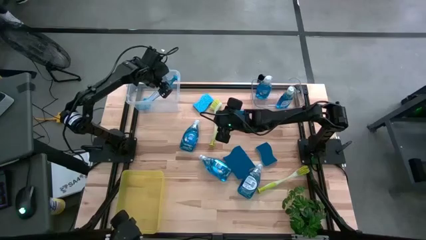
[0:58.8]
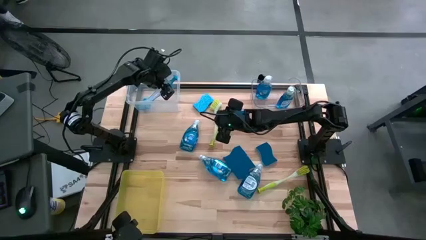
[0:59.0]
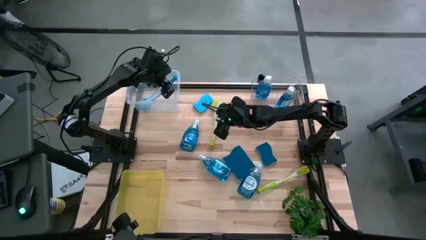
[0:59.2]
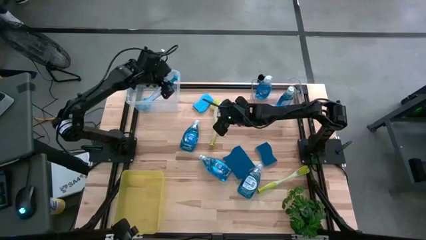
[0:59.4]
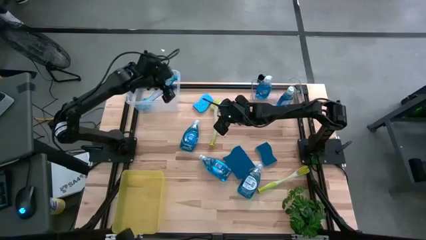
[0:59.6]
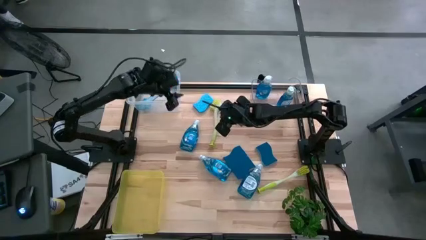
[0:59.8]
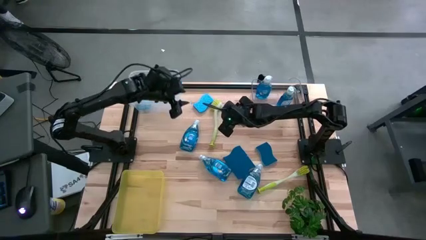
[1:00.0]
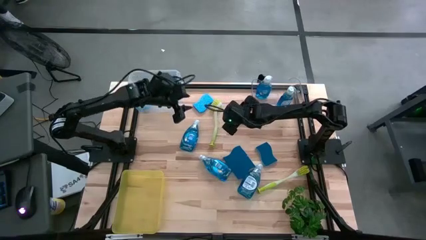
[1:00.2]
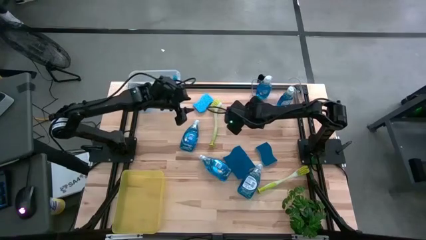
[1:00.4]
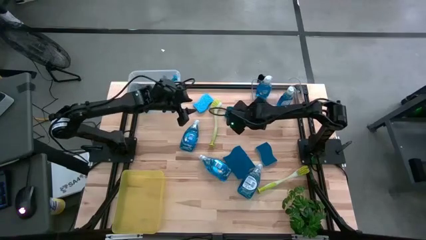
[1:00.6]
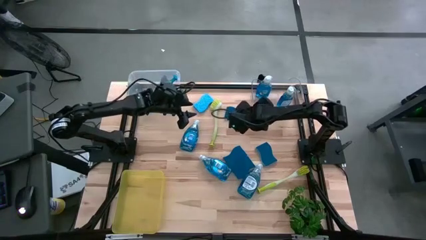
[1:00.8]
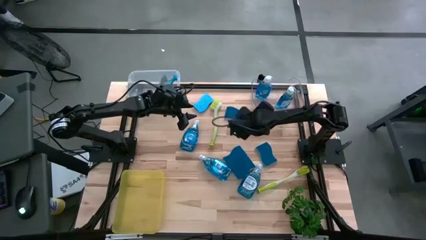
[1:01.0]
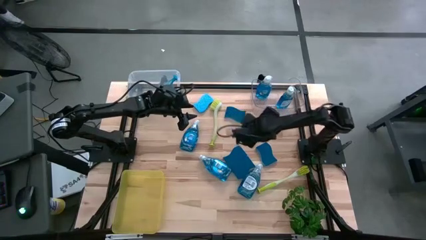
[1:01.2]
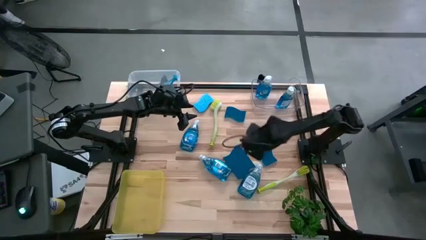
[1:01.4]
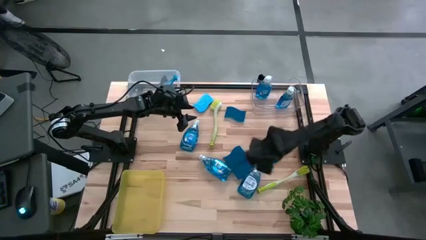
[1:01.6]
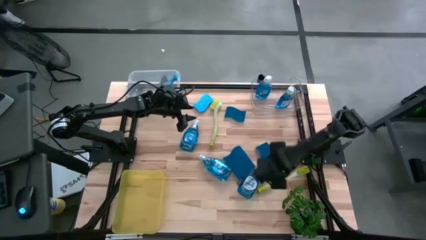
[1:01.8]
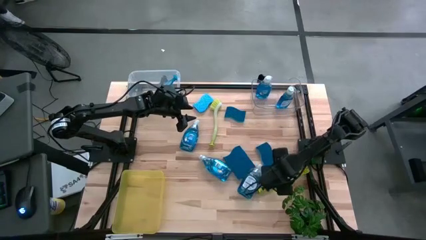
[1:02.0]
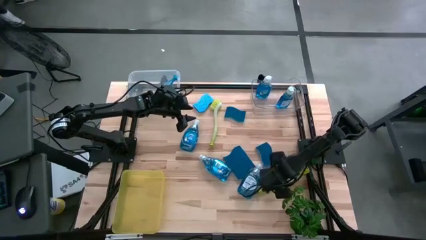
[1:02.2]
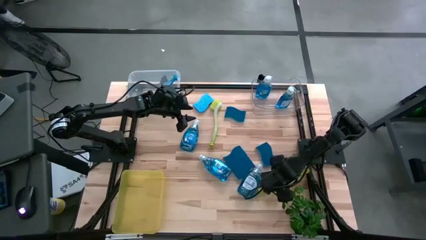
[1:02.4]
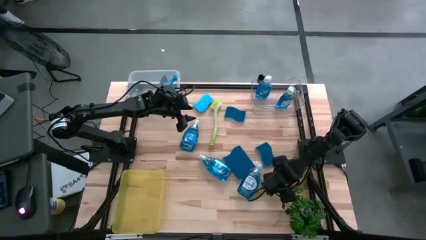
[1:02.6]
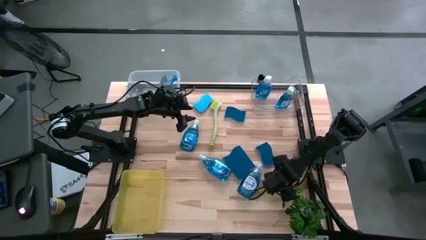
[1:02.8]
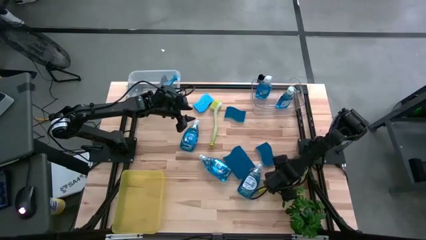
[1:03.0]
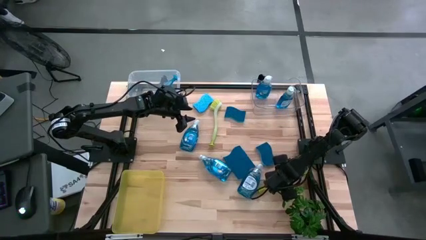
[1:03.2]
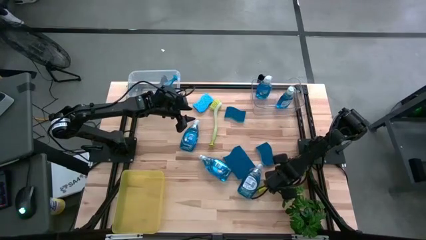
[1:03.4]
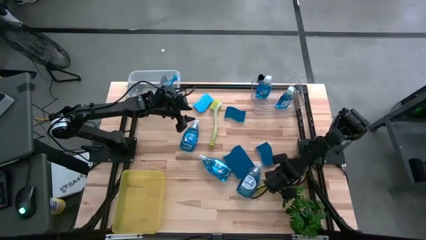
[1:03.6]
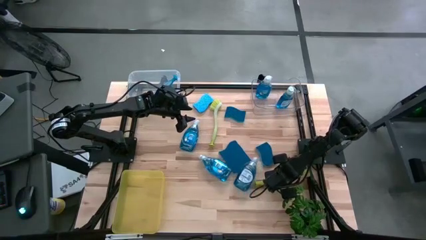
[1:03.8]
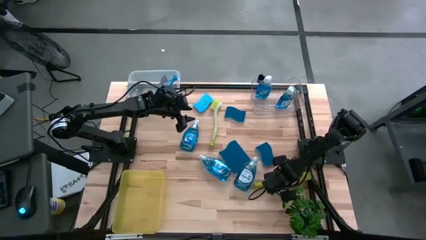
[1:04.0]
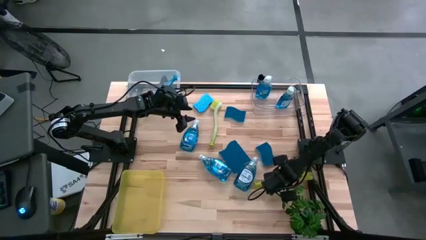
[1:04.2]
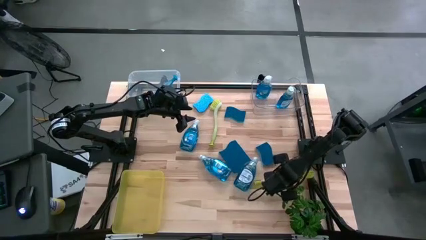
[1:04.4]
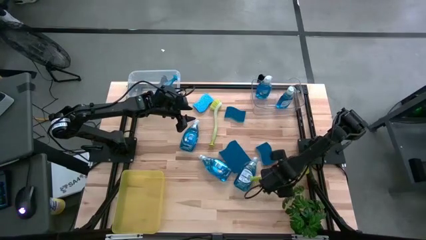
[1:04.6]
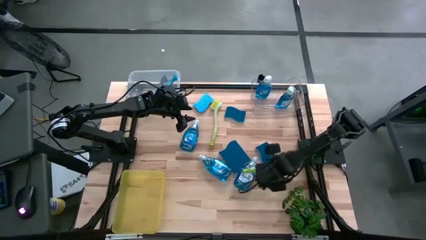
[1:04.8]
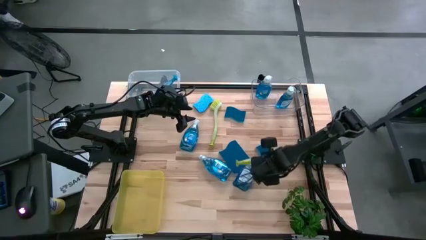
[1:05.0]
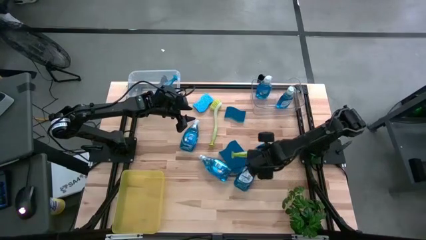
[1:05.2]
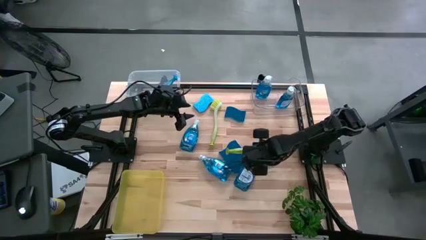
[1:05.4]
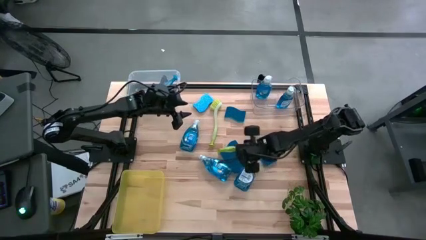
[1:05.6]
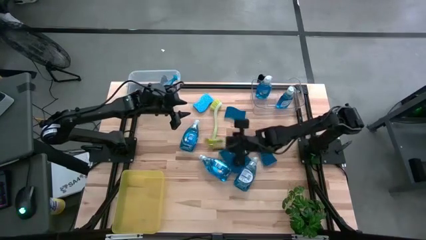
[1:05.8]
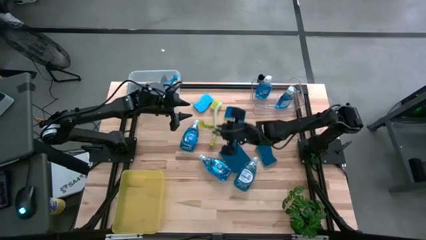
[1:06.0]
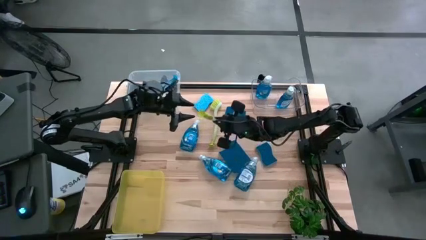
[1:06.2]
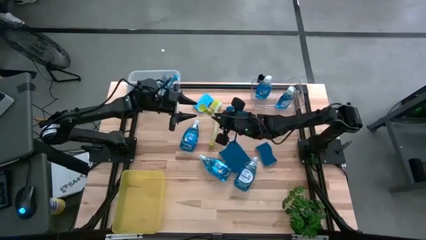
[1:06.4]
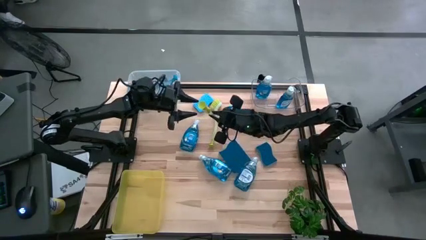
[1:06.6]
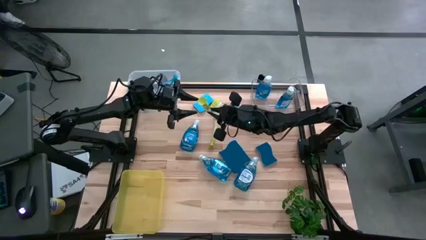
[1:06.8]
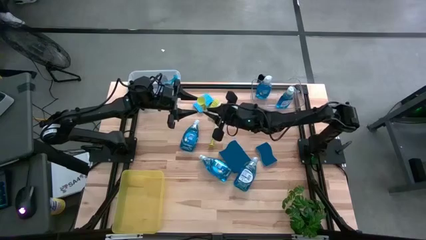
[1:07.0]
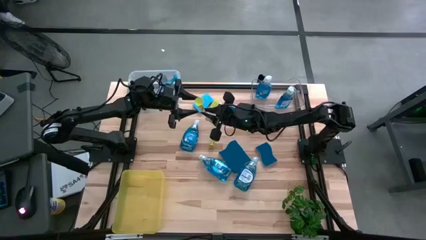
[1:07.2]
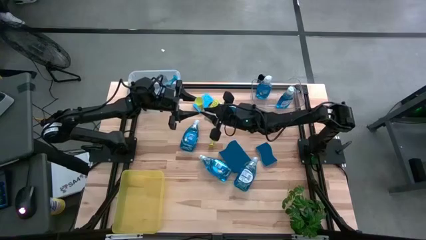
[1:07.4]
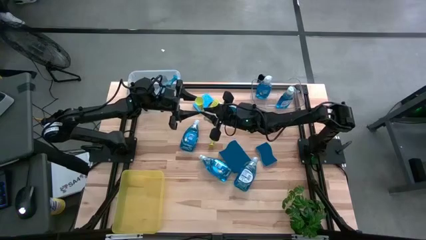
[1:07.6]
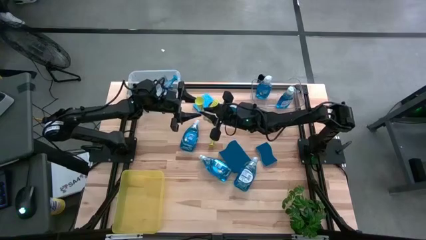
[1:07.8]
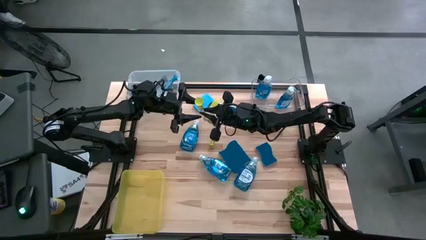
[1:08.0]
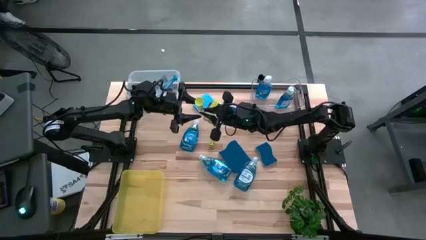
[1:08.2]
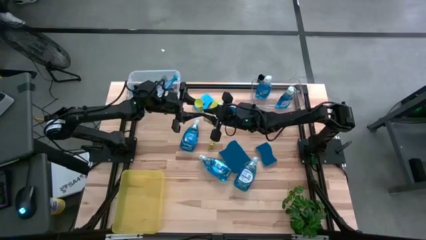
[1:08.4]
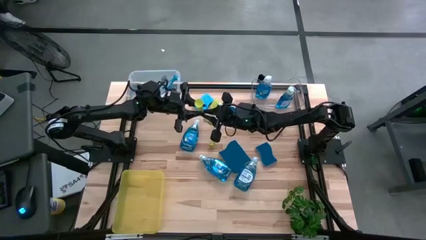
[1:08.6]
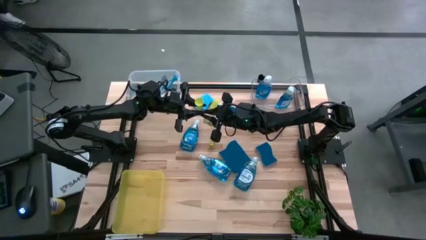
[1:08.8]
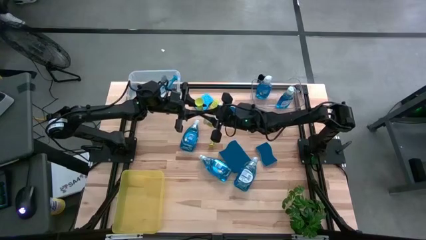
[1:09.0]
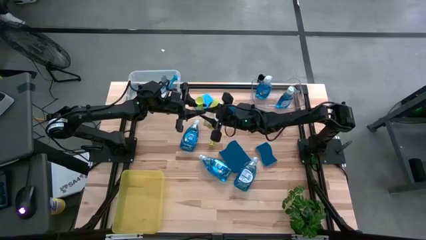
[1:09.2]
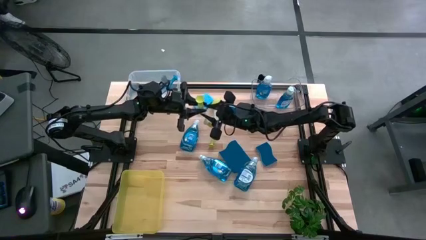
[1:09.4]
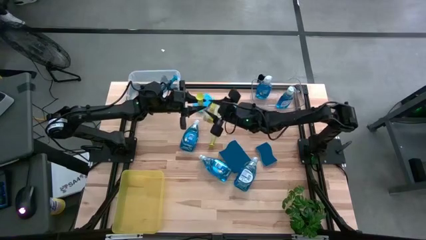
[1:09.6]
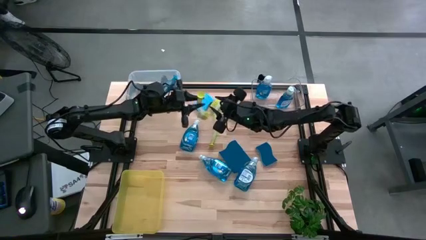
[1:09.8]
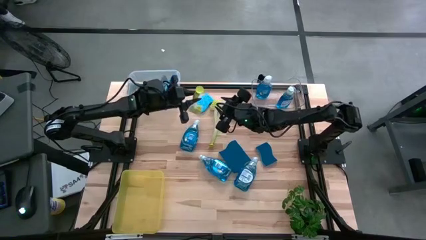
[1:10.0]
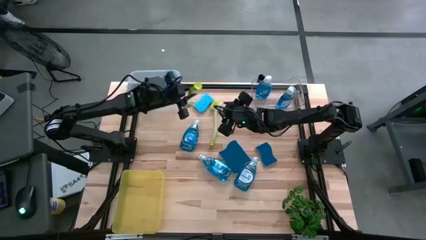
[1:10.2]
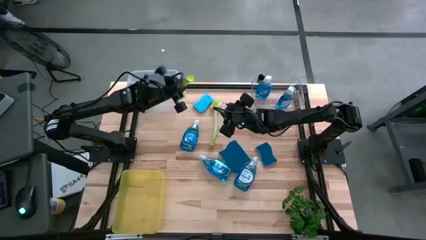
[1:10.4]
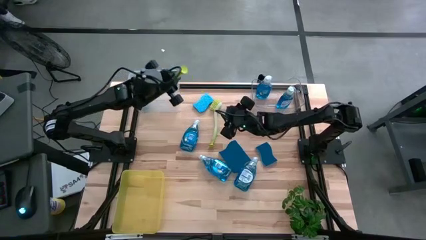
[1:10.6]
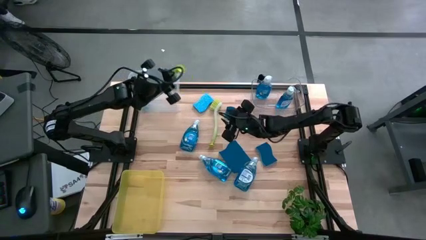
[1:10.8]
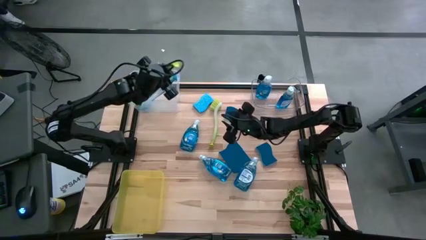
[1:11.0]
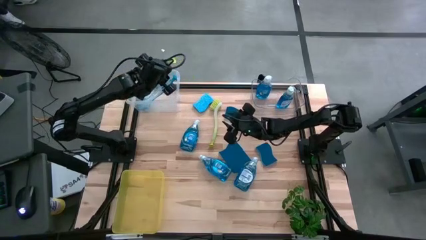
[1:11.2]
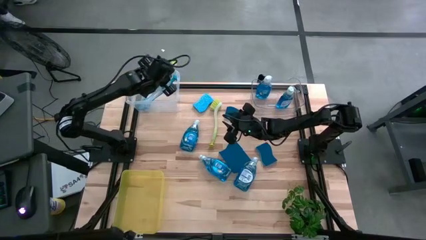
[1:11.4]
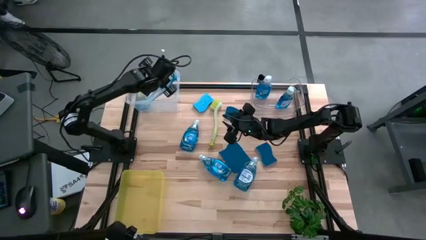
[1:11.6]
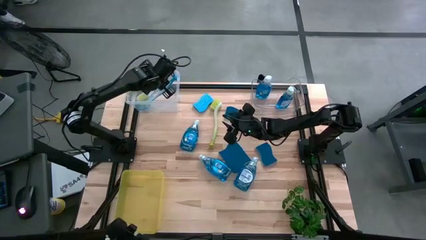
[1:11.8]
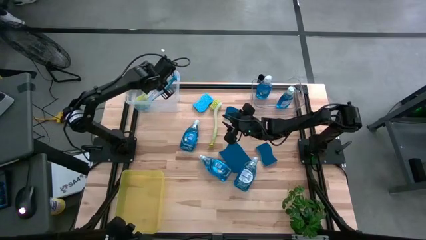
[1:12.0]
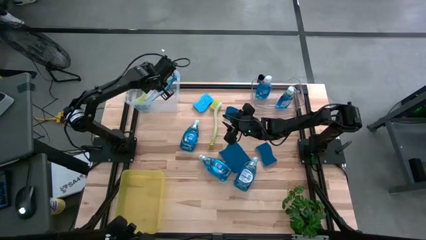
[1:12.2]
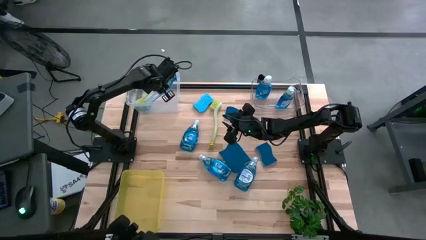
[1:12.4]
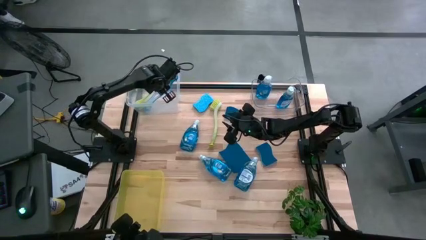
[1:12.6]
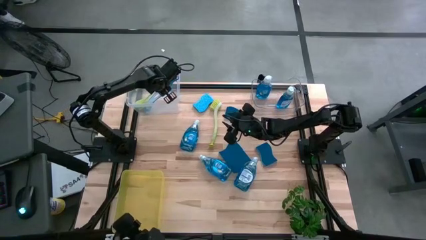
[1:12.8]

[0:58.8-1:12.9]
Task: Pick & Place Kitchen Sink Supplies
Put the bottom yellow and green dish brush into the white transparent bin

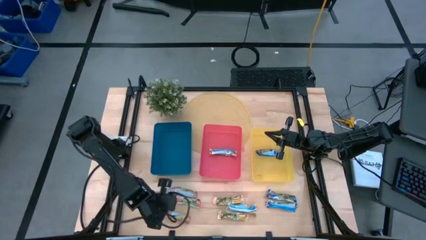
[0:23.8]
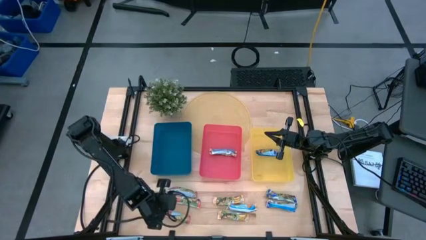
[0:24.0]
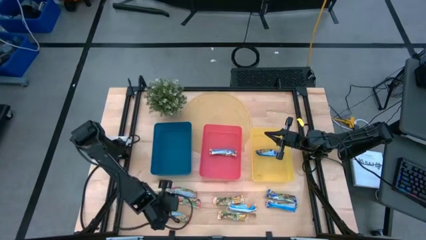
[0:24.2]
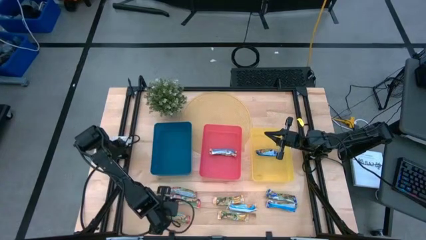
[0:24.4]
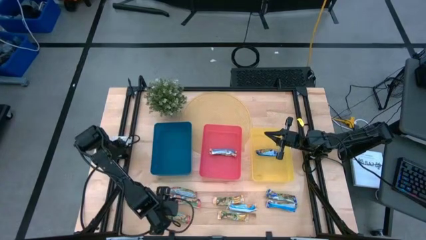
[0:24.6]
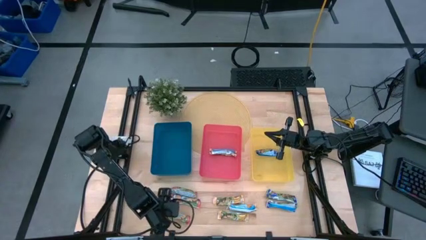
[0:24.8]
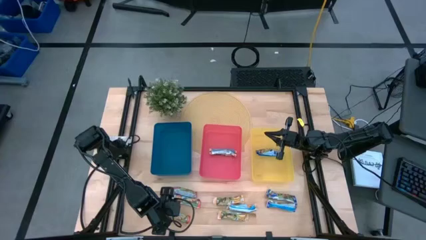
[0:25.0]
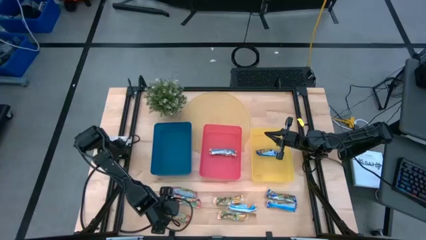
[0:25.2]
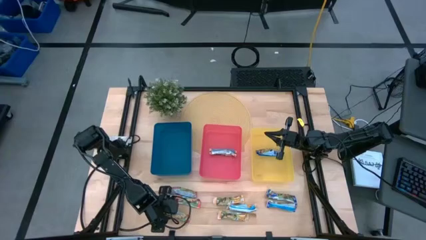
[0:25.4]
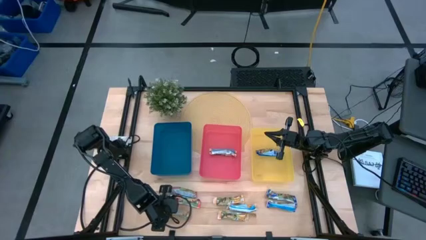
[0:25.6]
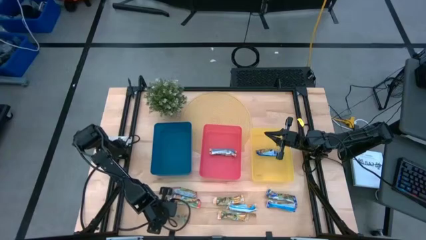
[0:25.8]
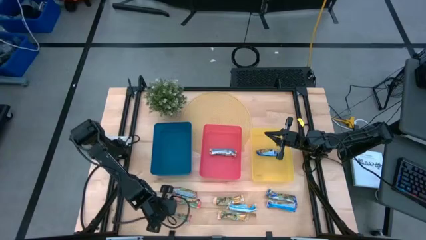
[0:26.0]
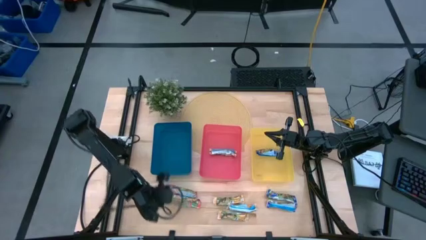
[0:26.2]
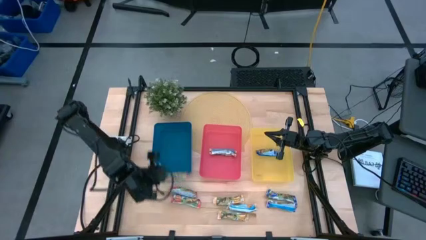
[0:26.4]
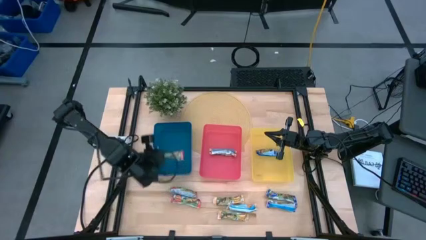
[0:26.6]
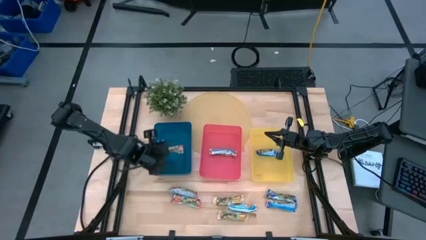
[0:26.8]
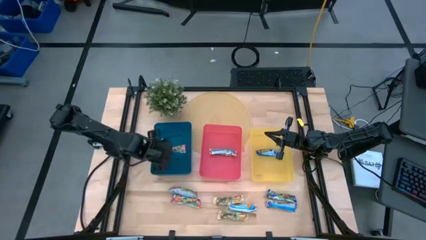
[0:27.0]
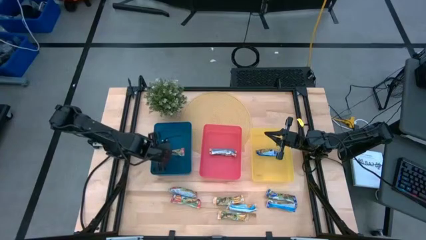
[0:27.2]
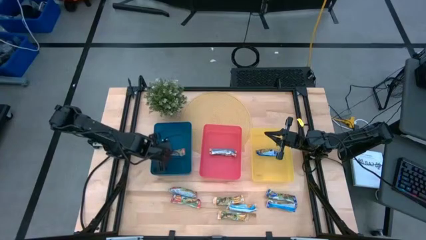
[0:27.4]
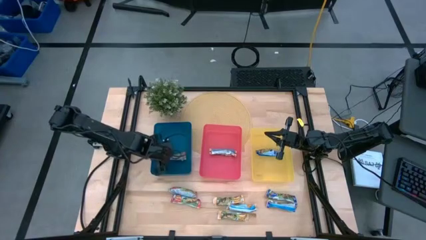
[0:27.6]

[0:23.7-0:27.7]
Task: Pick and place Granola Bars by type
Put the red granola bar into the blue bin
